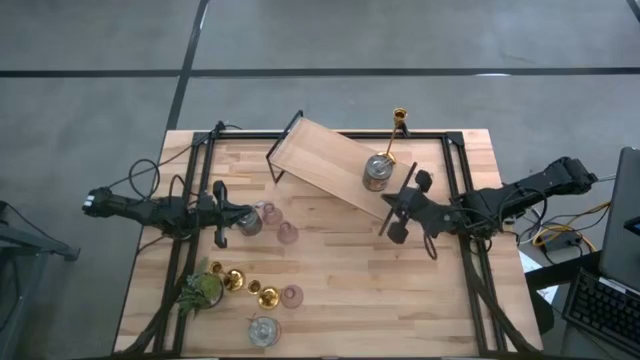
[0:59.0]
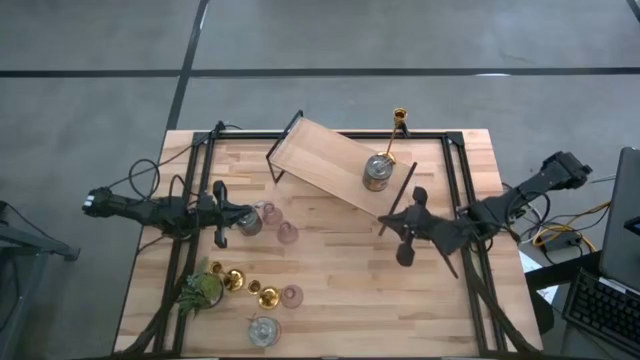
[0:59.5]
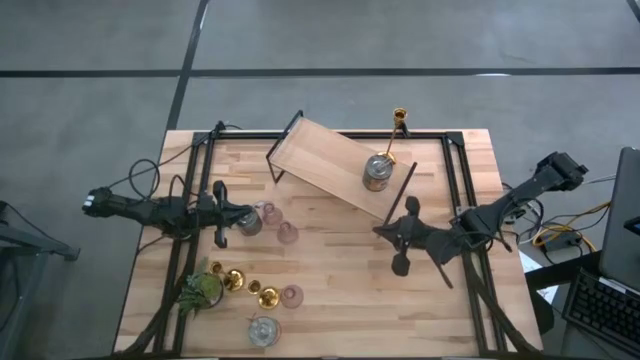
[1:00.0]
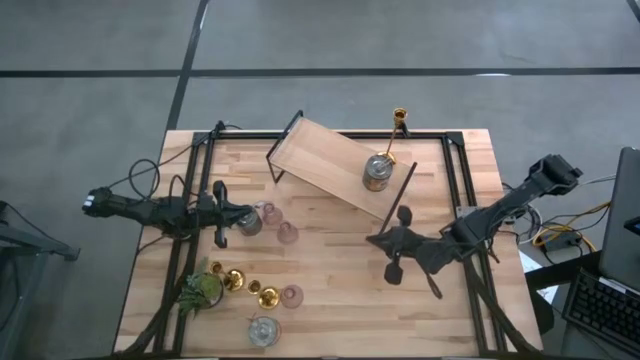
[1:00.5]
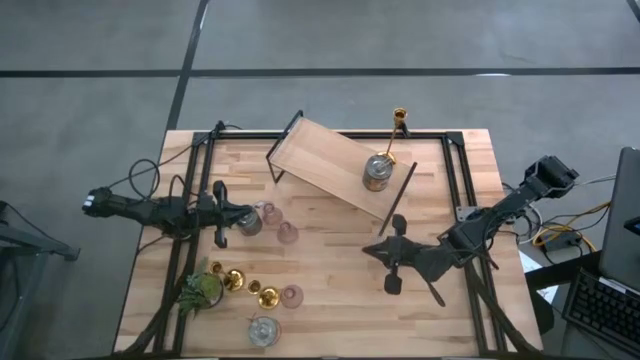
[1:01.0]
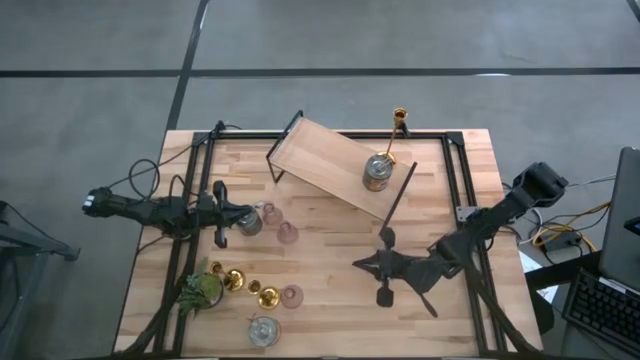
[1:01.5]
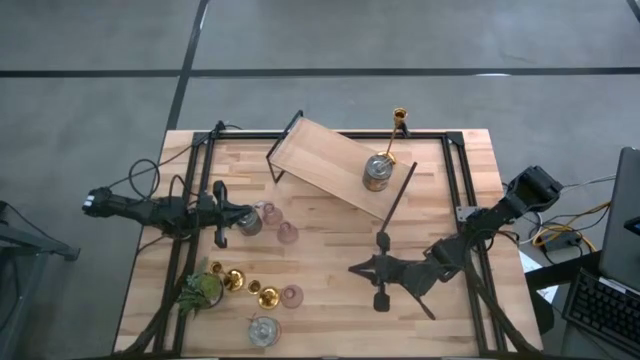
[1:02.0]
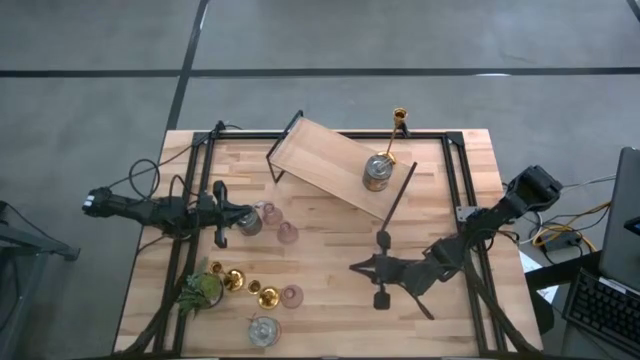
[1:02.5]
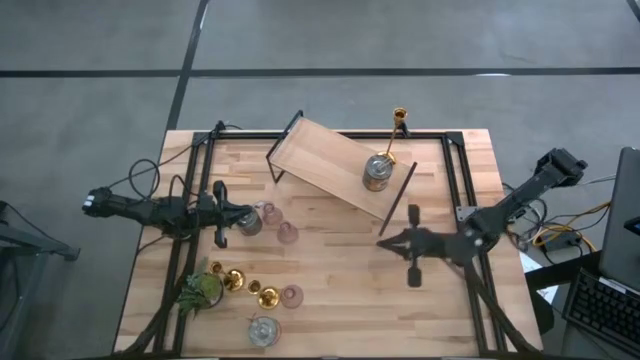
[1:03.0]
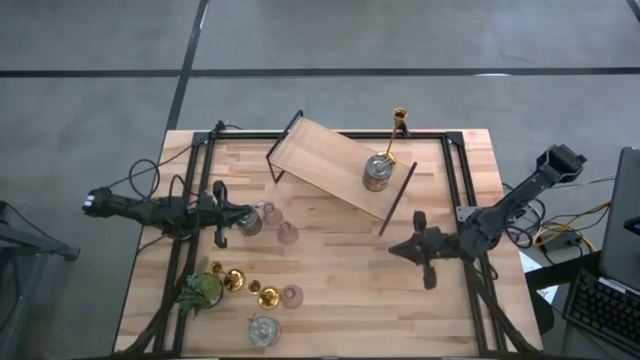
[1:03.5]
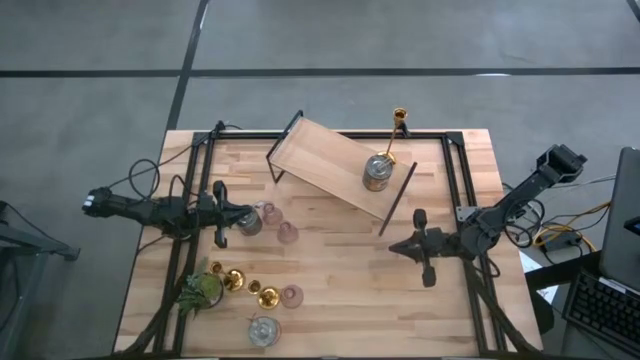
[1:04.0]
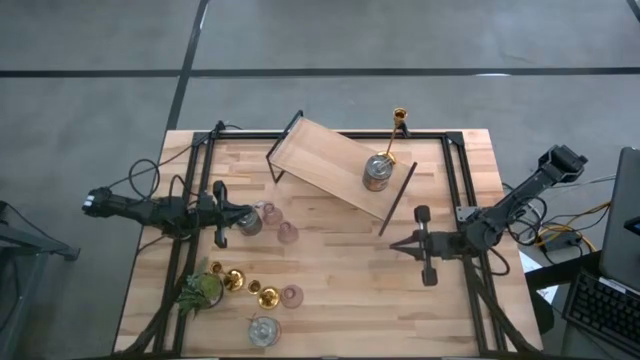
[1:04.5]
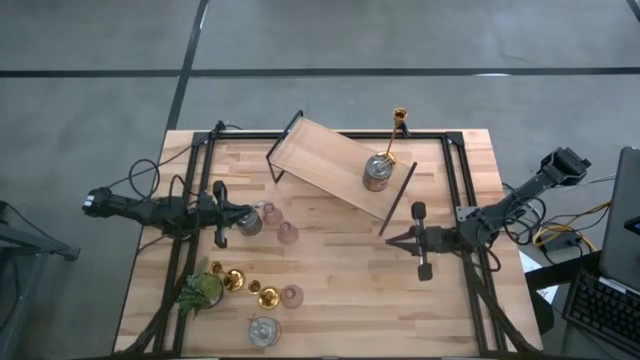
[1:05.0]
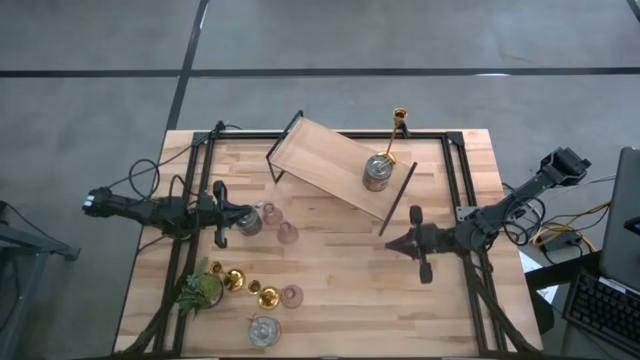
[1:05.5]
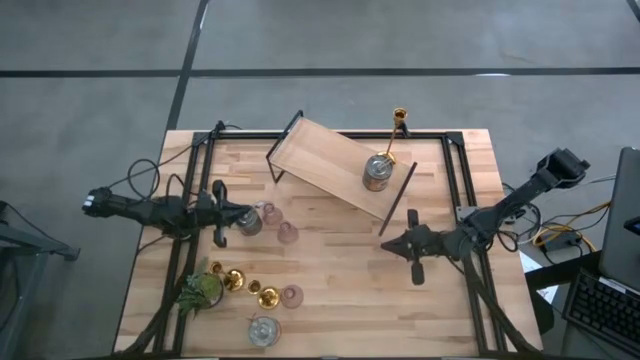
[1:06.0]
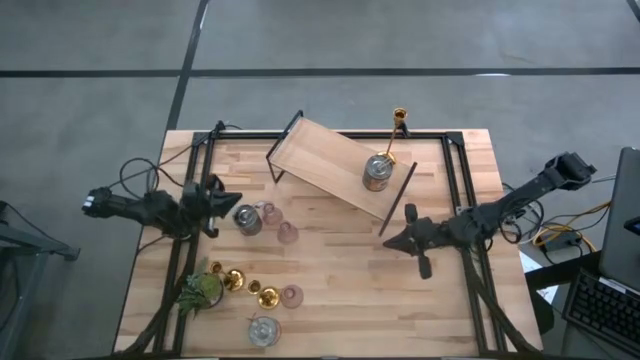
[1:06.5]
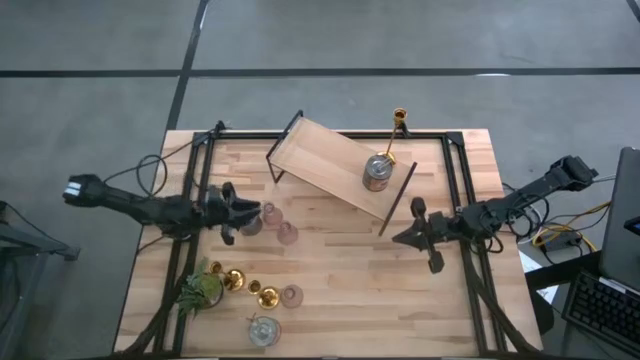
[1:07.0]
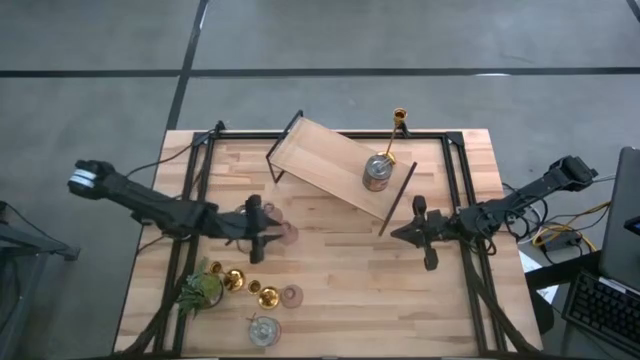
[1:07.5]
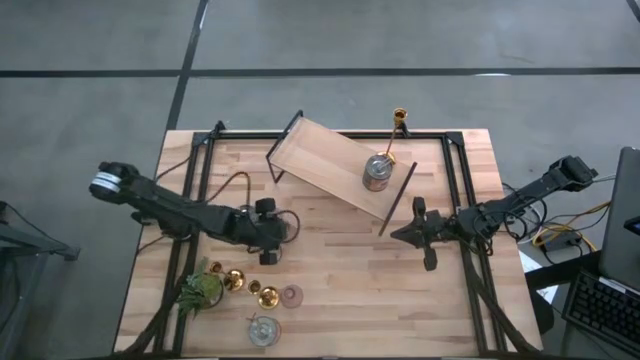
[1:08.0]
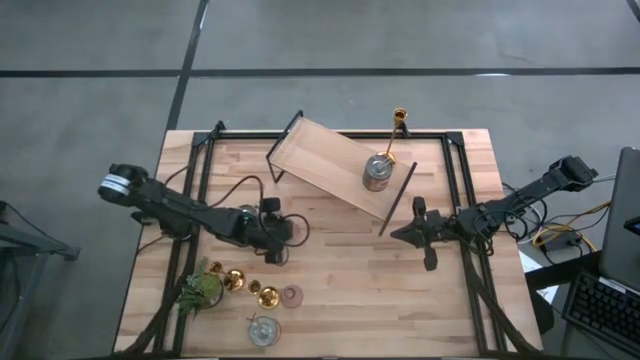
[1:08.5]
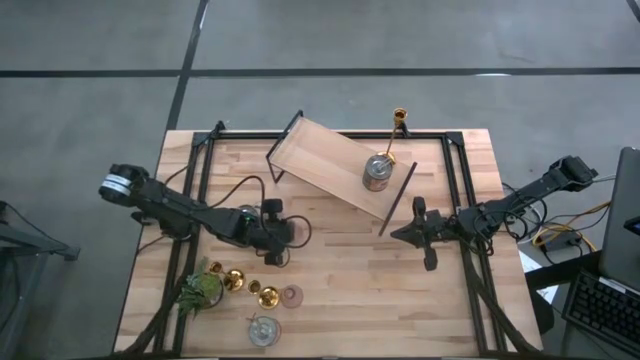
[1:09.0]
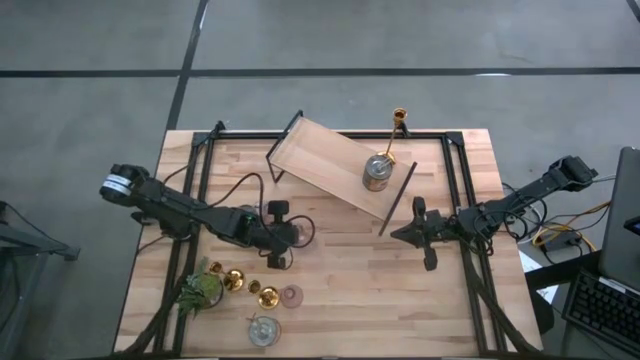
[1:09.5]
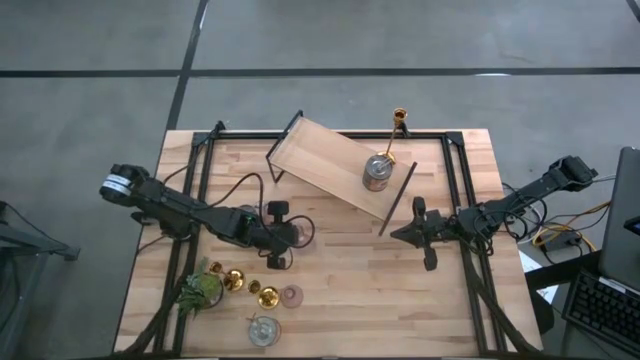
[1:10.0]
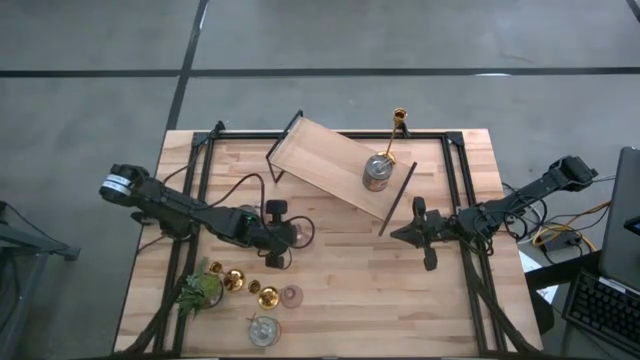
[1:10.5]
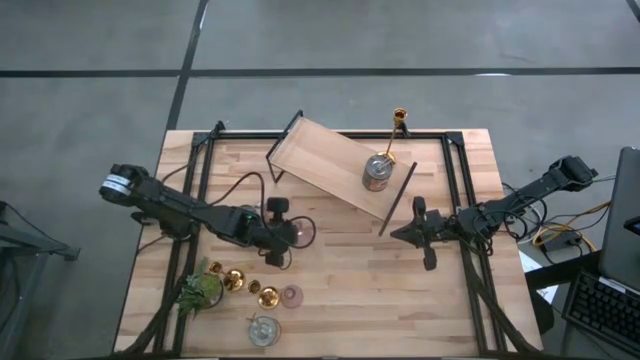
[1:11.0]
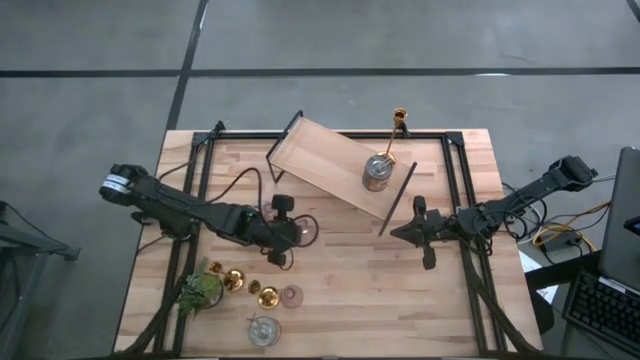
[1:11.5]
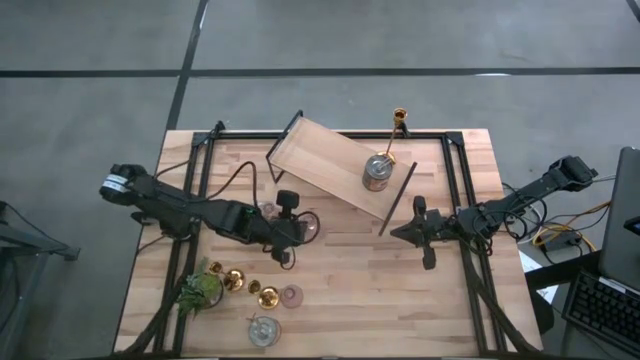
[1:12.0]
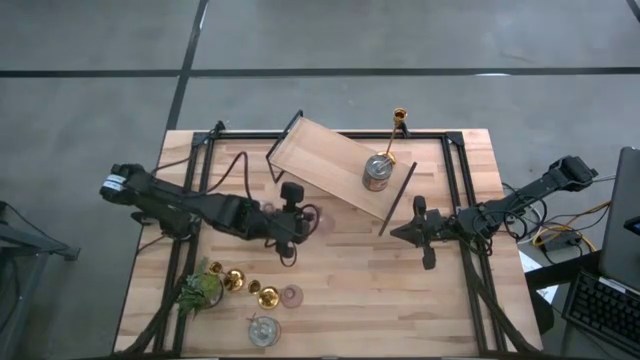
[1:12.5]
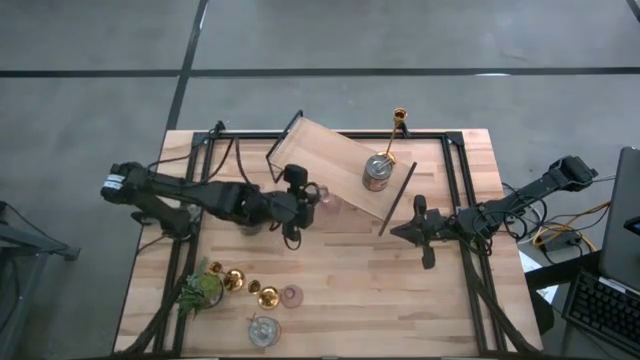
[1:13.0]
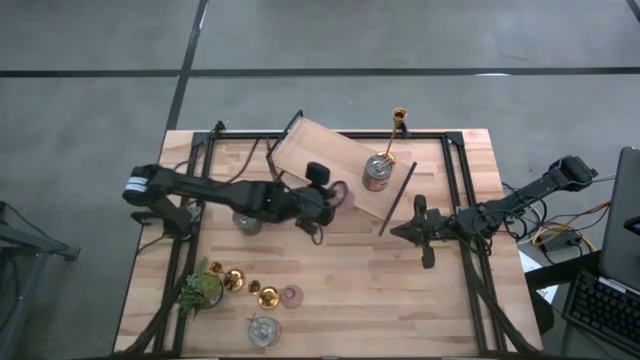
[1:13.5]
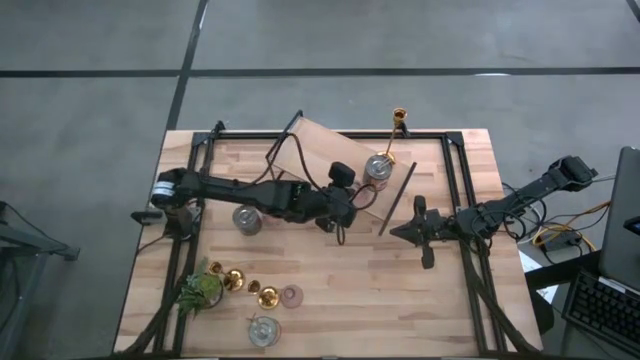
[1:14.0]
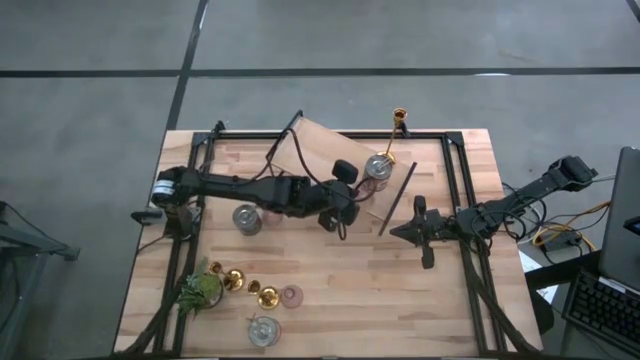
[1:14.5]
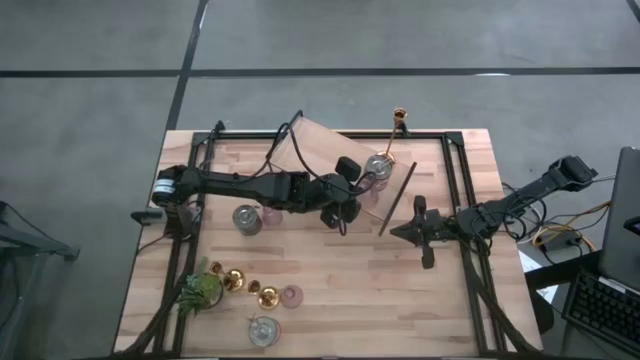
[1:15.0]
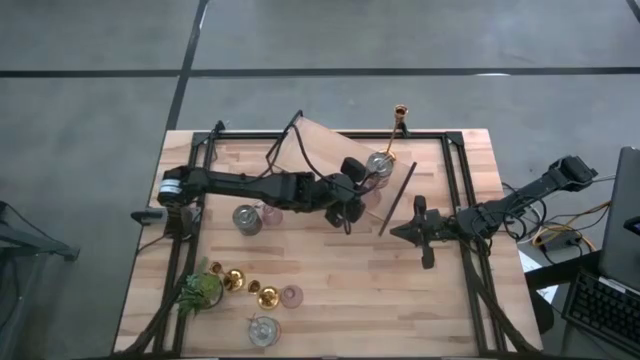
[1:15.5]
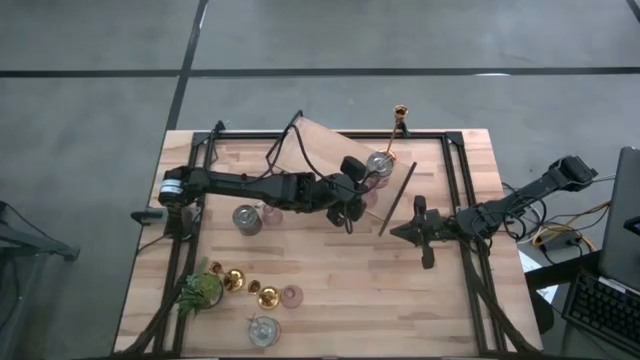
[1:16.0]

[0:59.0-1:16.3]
Task: Pick & Place candle stick holders
Put the middle pink glass candle holder on the shelf

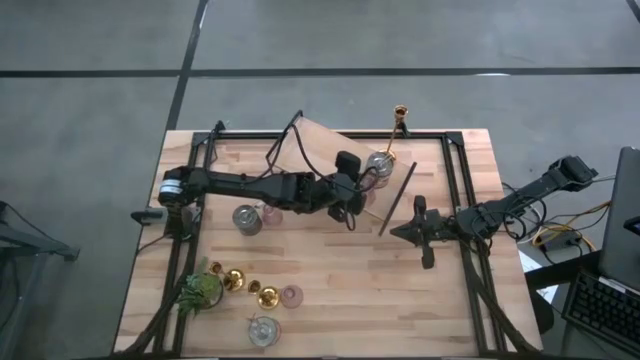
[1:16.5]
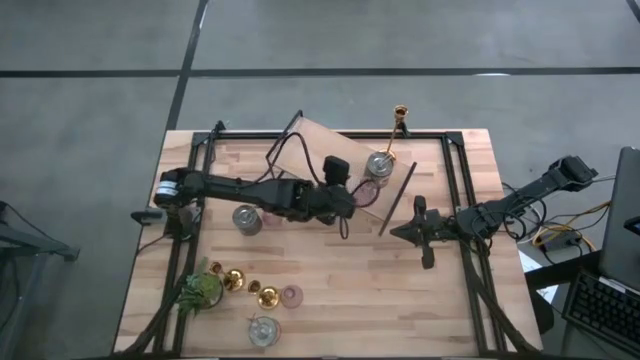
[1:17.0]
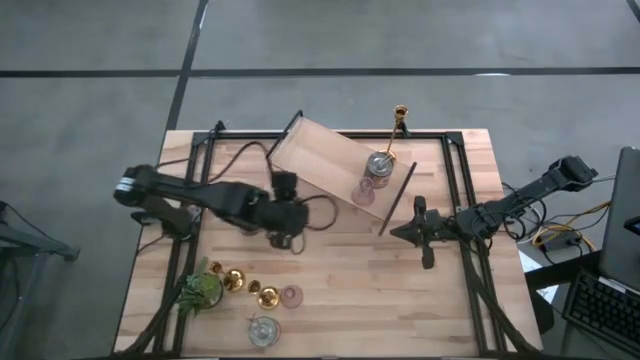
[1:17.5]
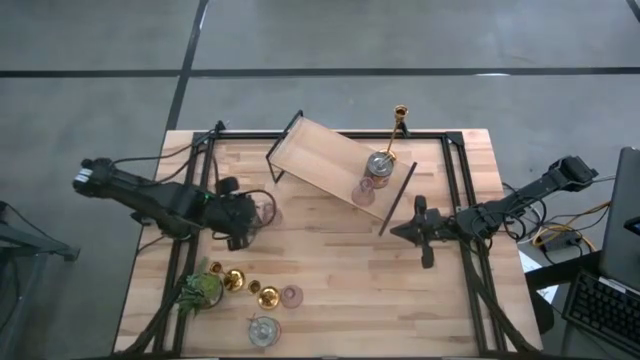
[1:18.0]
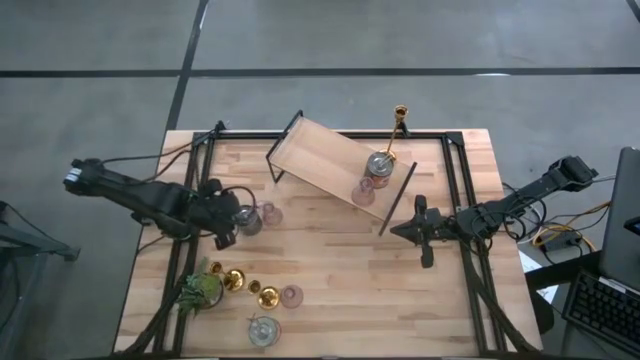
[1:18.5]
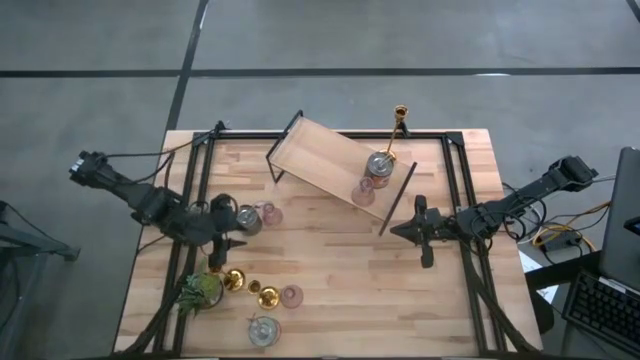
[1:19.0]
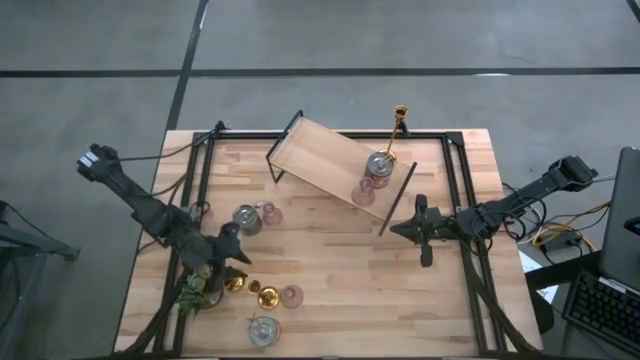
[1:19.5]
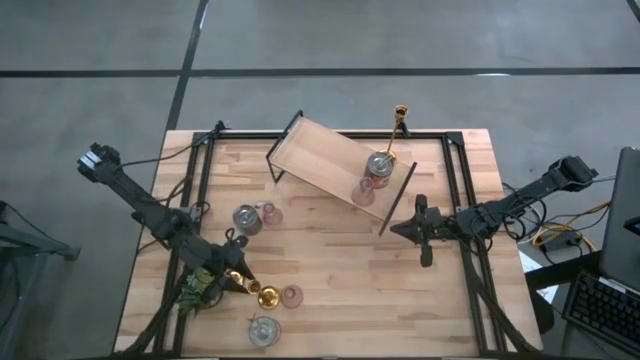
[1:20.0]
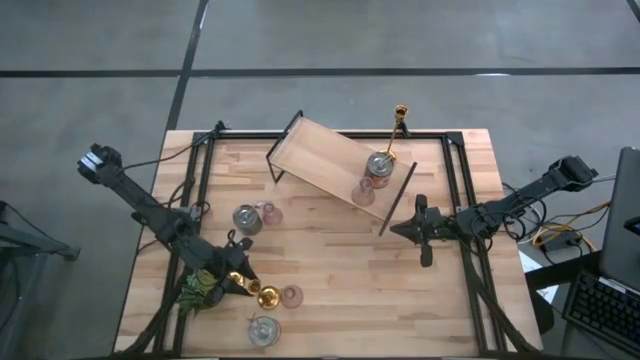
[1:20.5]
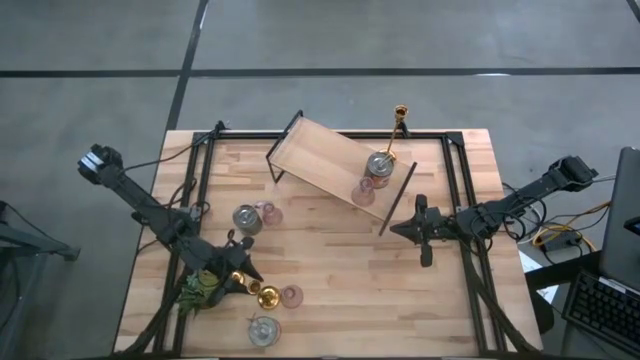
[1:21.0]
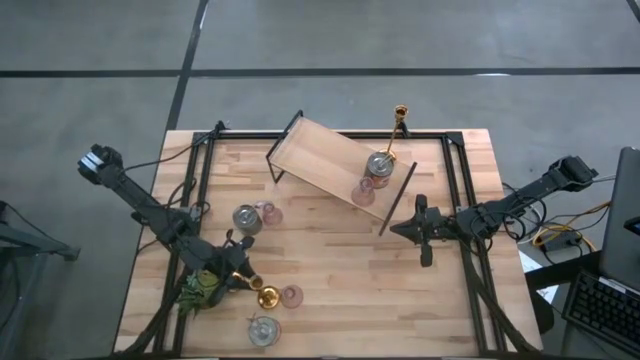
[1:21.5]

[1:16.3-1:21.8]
Put the right gold candle holder on the shelf aligned with the other gold candle holder
